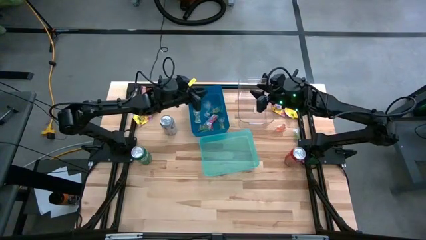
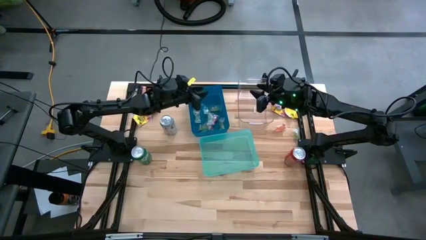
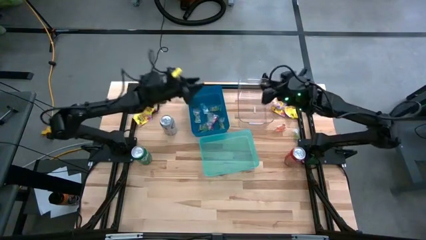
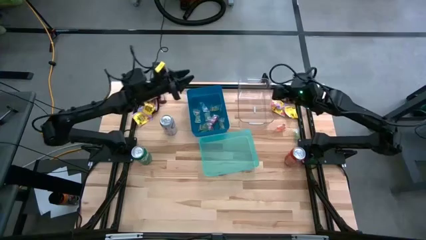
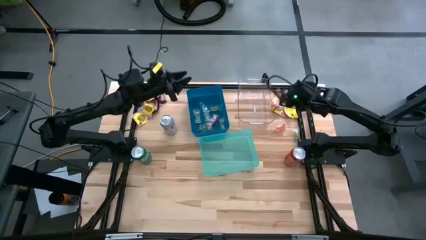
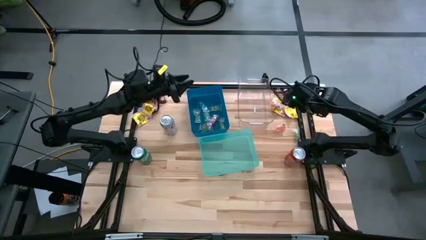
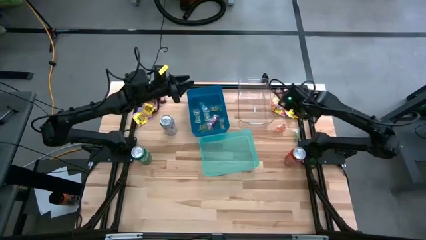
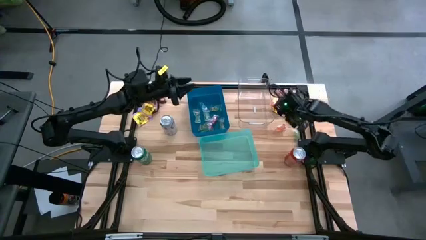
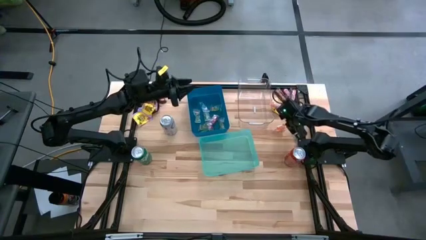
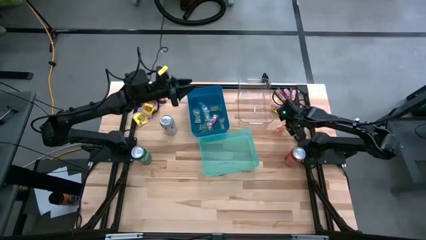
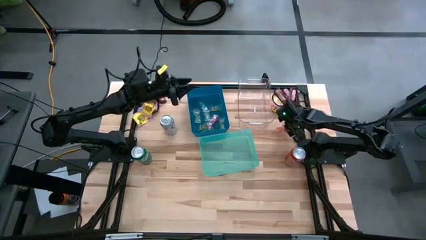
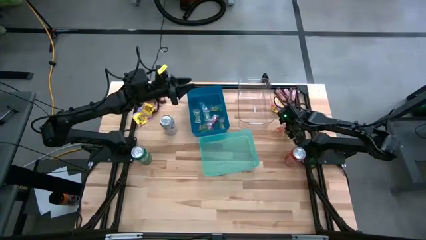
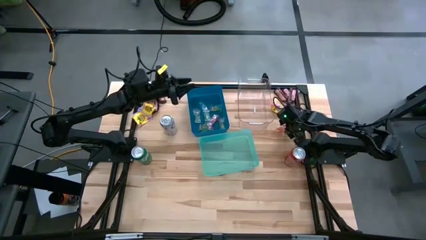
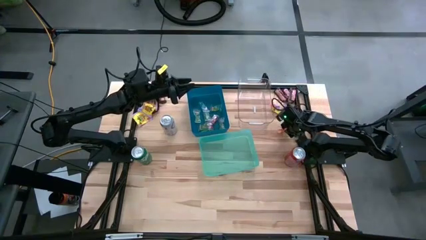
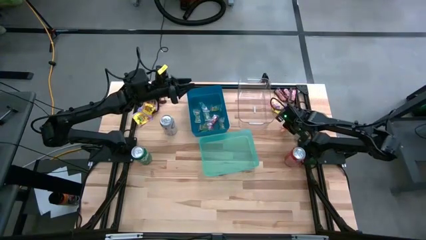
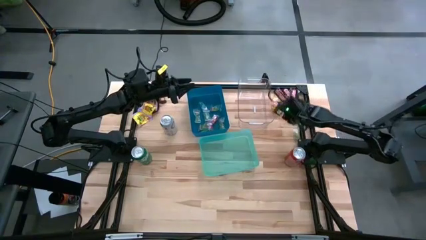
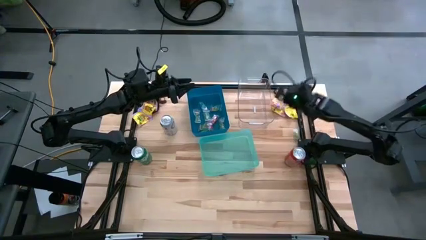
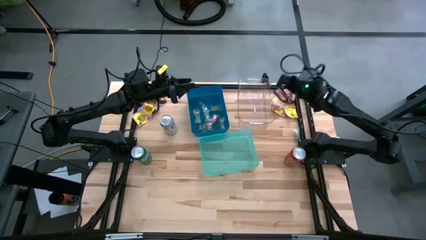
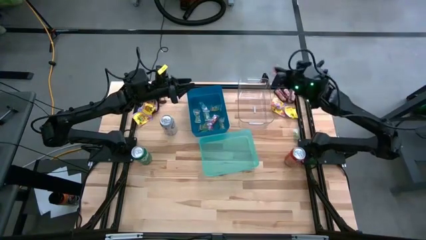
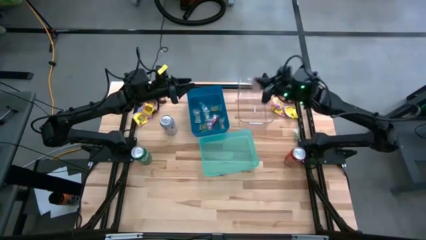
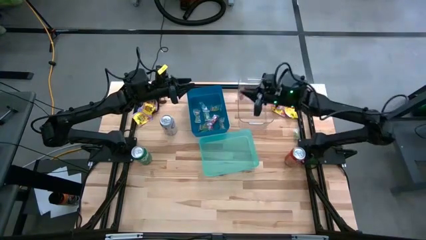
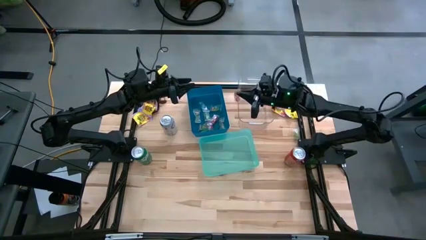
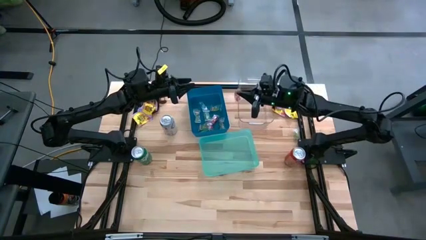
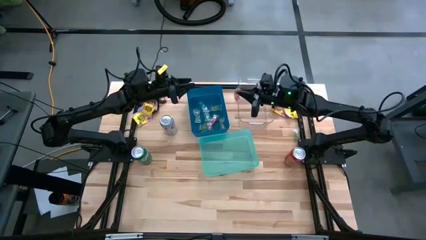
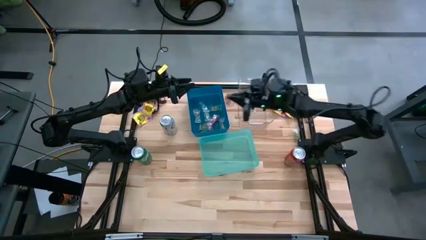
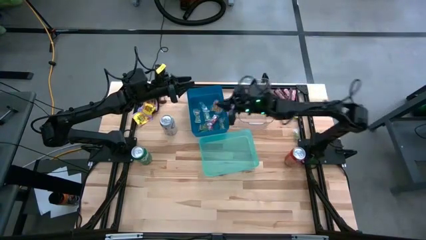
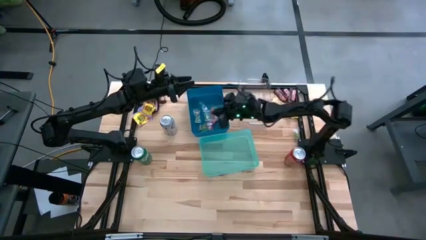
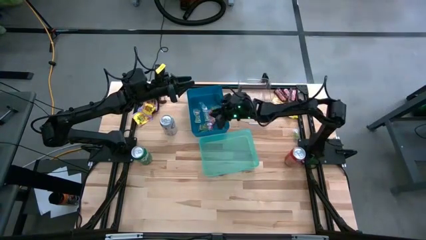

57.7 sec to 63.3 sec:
Task: Sort candy
Put the orange candy into the blue bin

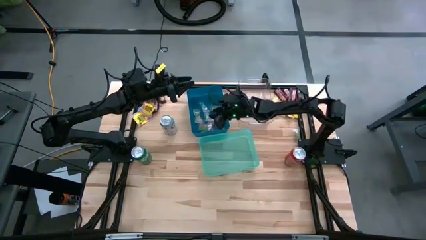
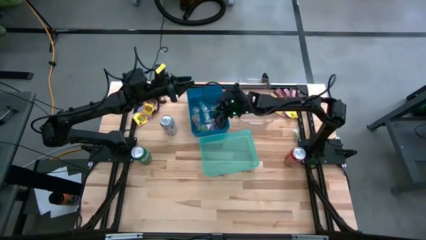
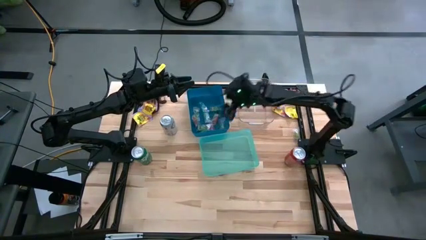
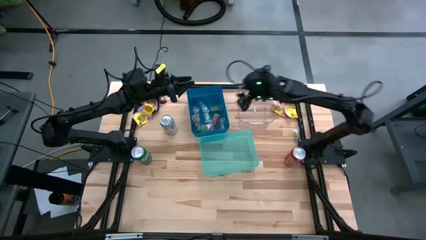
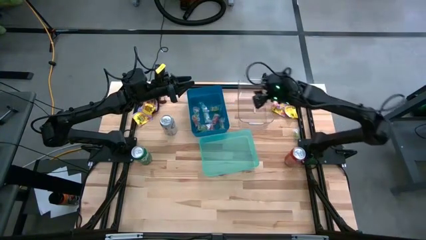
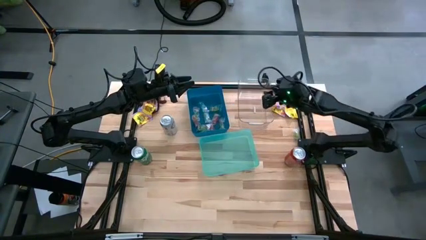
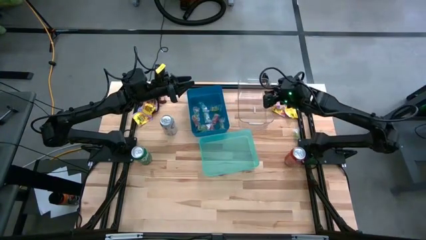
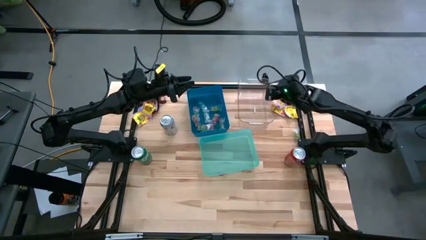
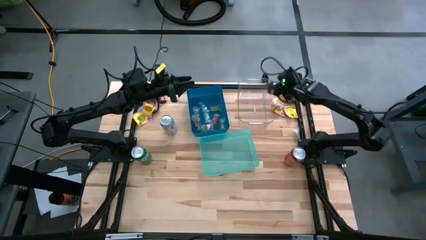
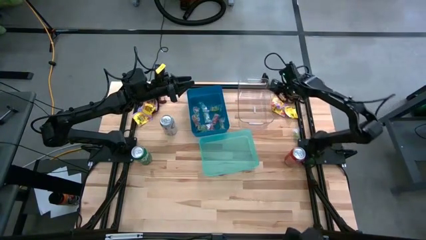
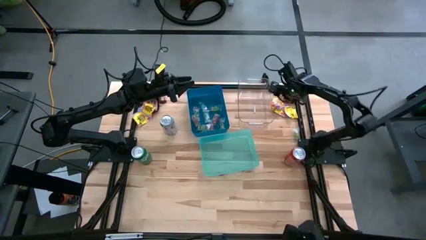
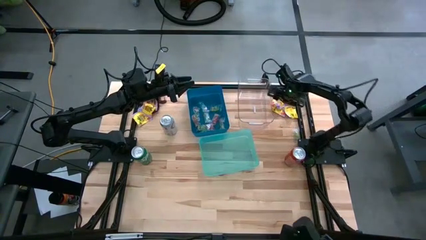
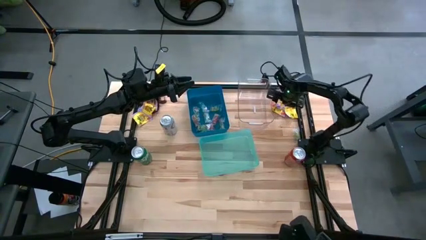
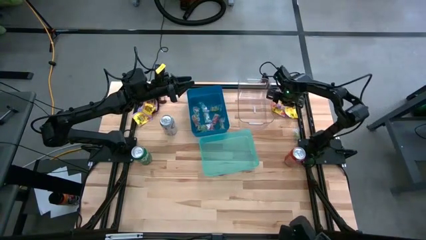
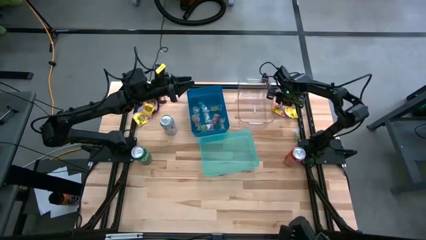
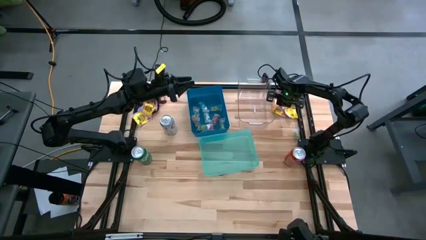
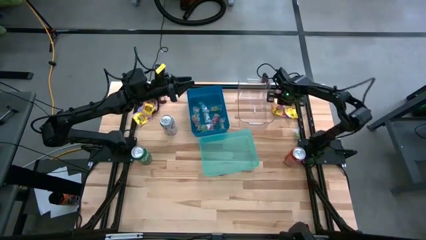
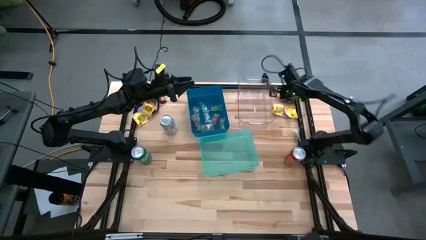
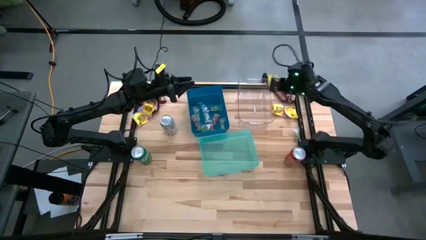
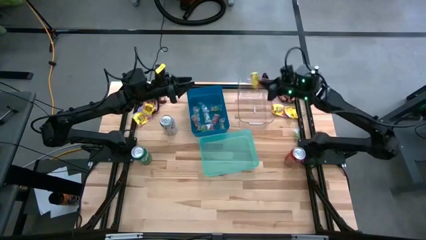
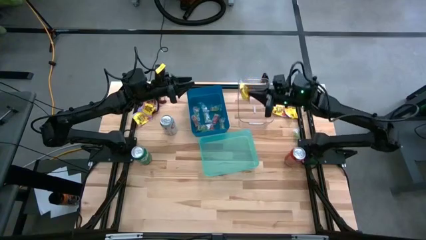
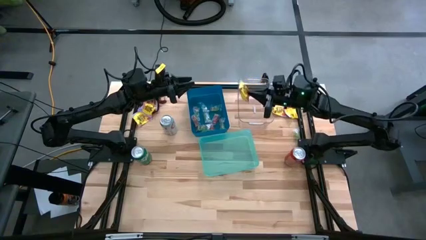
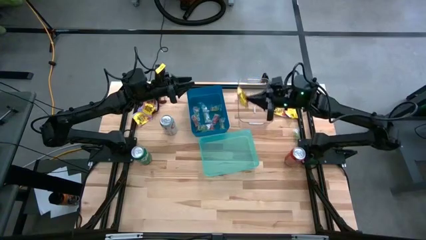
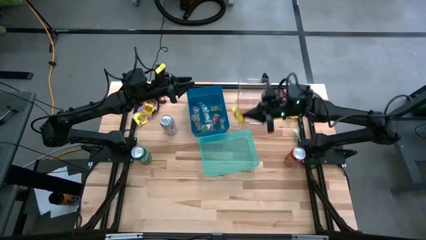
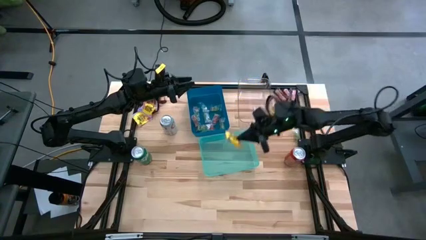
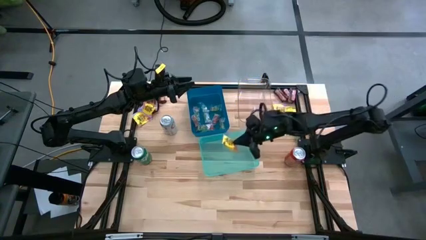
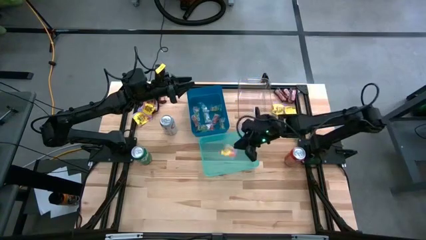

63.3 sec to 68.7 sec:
Put the yellow candy into the green bin

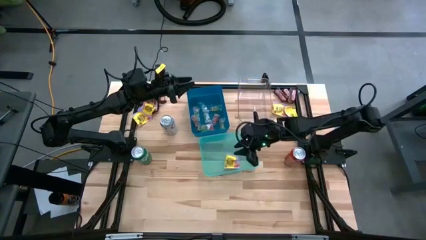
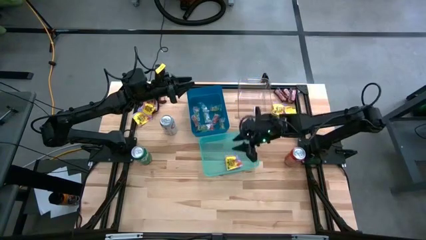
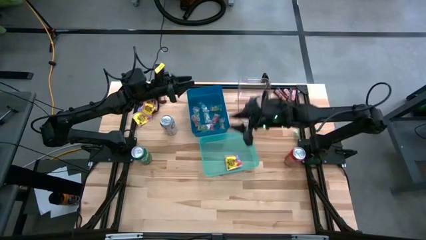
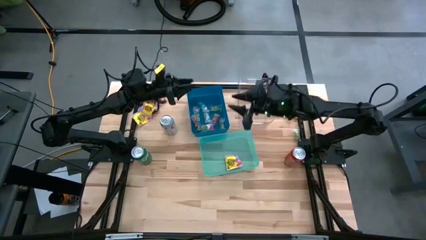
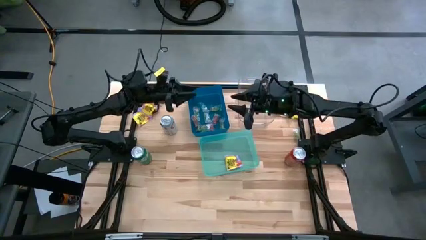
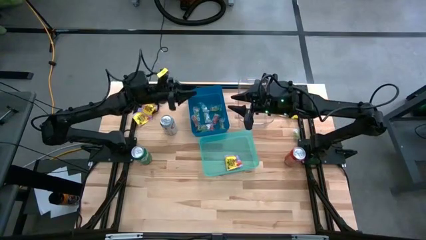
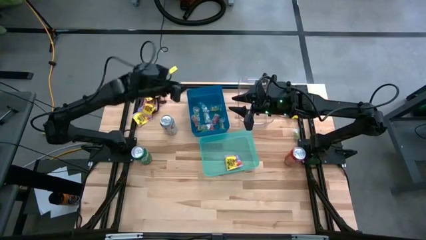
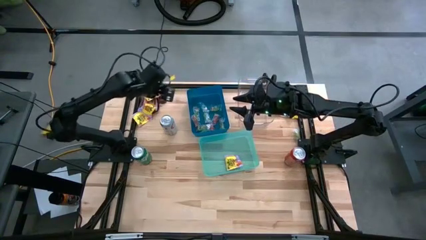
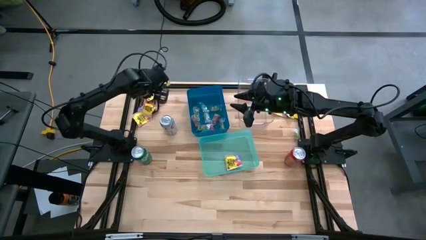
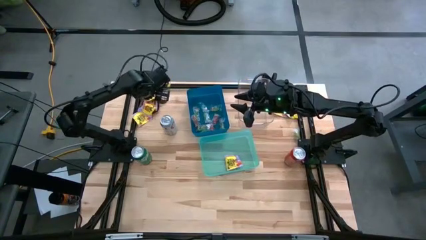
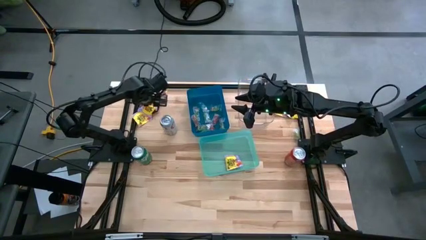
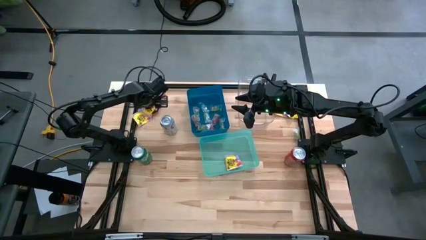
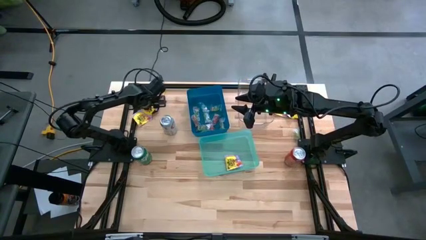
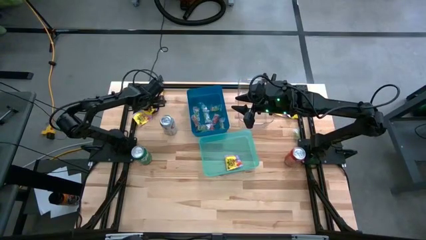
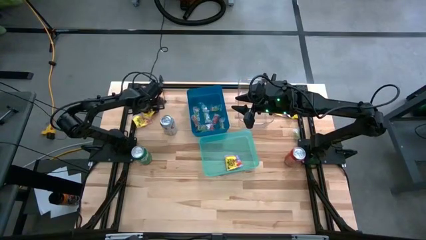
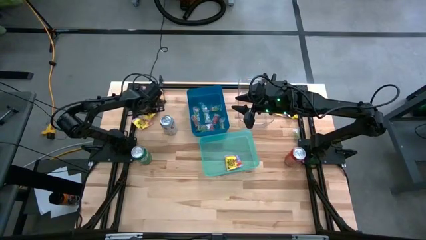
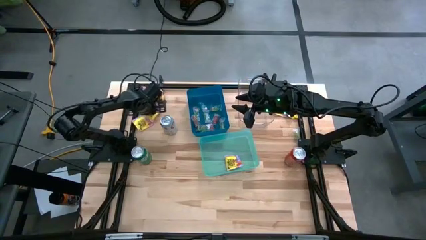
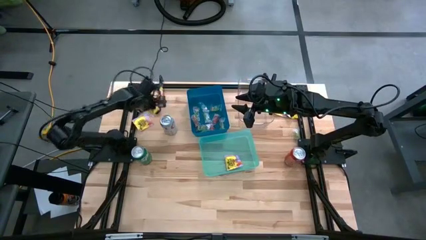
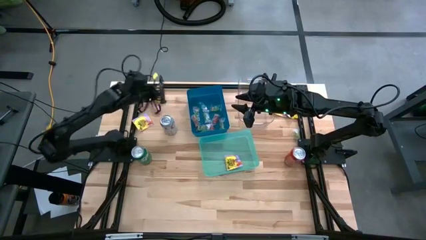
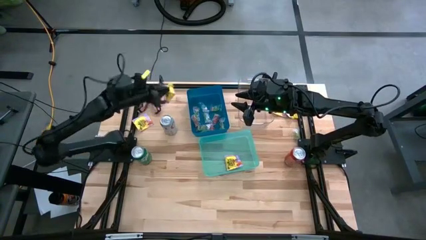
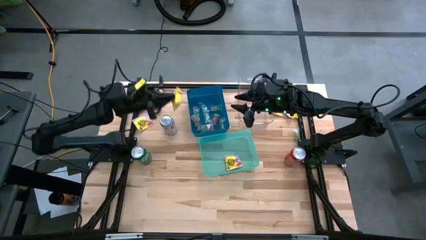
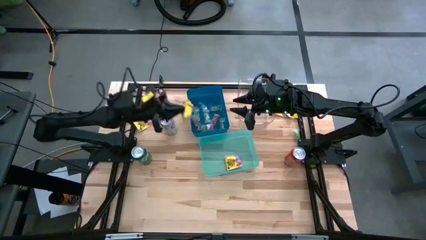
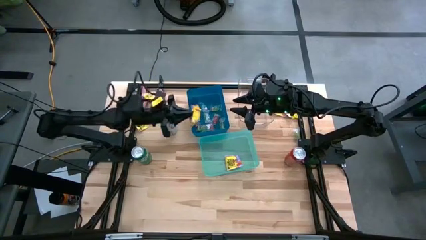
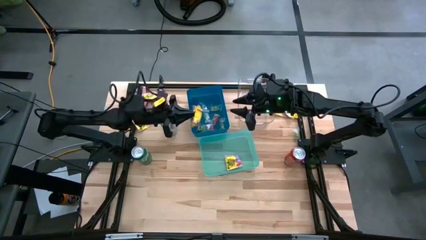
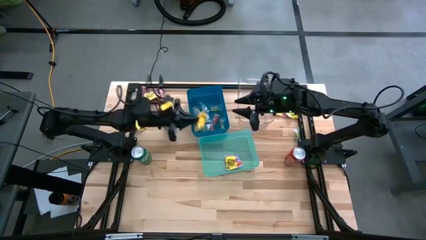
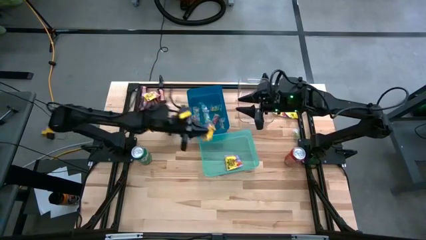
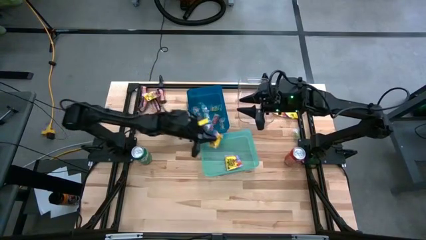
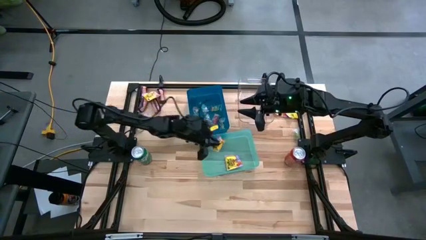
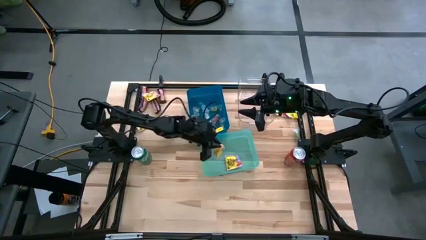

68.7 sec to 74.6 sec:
Put the yellow candy into the green bin
